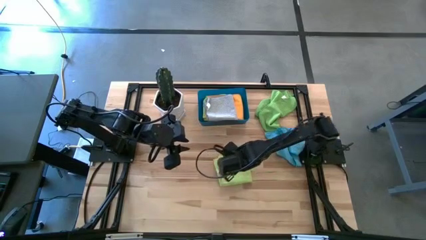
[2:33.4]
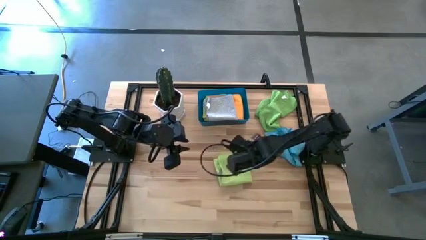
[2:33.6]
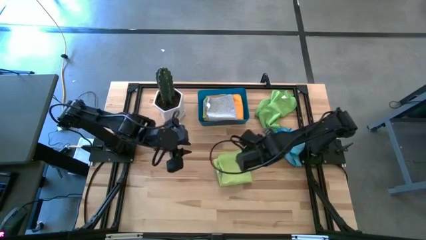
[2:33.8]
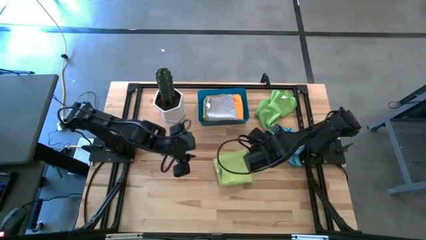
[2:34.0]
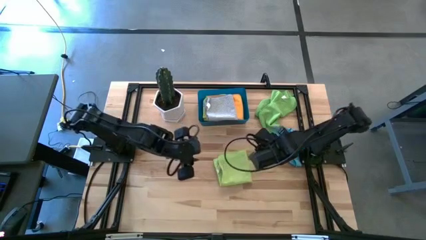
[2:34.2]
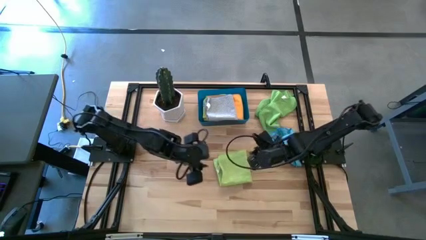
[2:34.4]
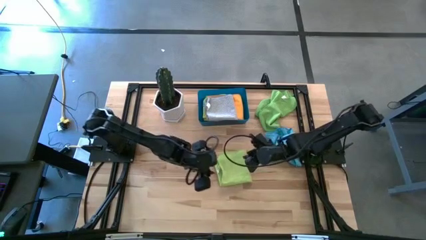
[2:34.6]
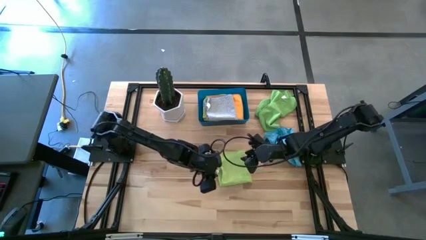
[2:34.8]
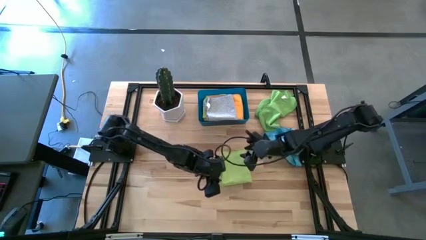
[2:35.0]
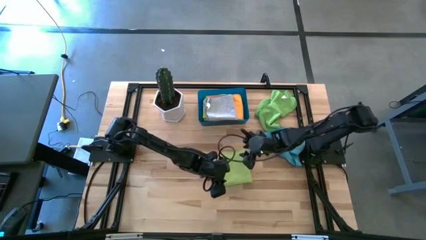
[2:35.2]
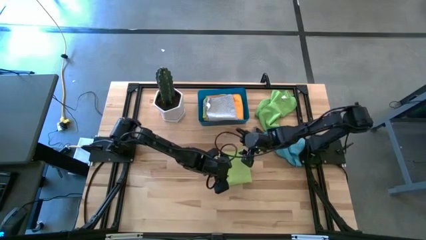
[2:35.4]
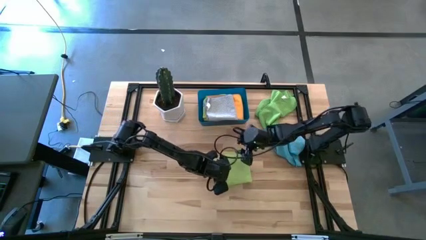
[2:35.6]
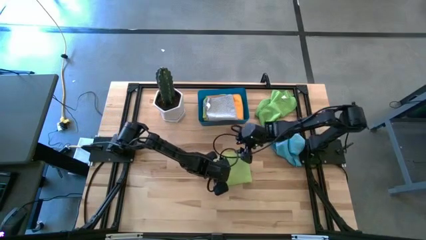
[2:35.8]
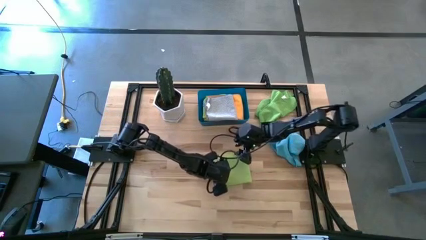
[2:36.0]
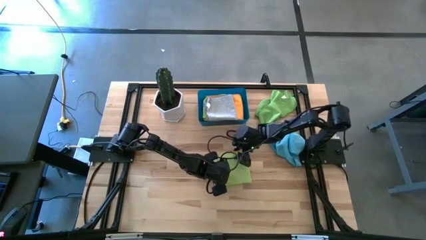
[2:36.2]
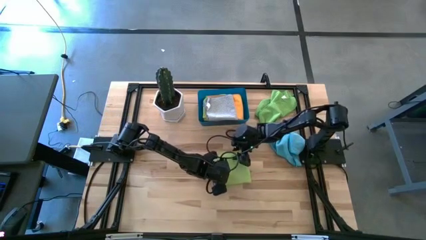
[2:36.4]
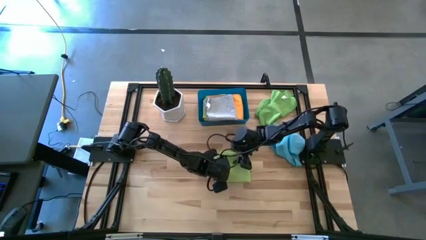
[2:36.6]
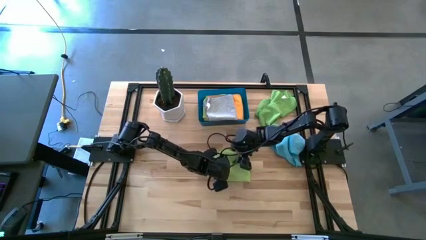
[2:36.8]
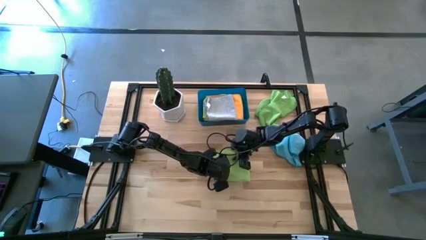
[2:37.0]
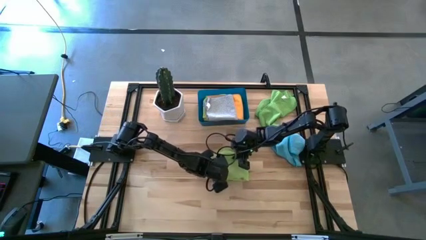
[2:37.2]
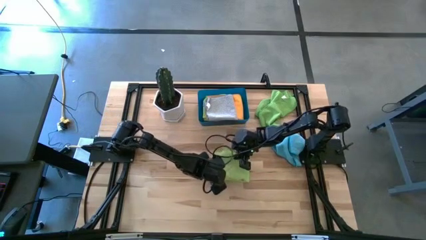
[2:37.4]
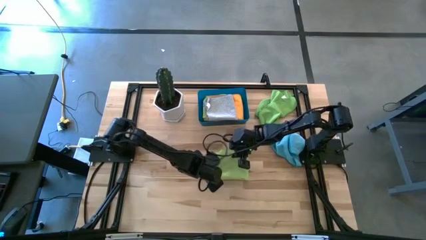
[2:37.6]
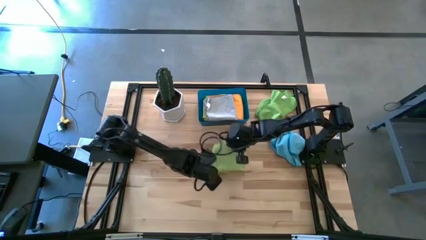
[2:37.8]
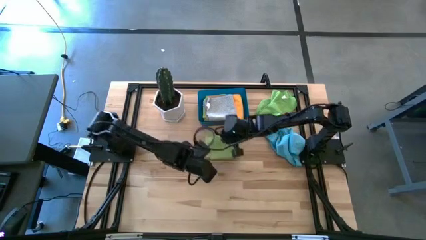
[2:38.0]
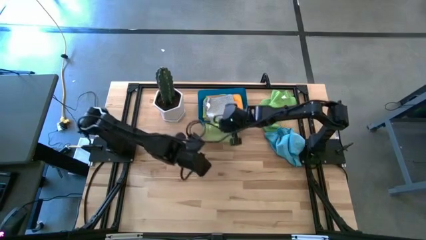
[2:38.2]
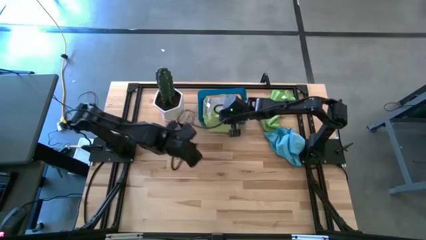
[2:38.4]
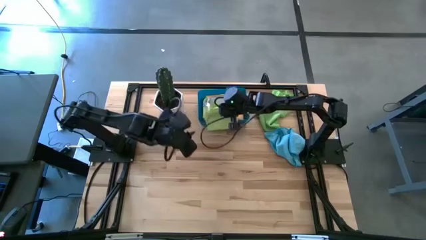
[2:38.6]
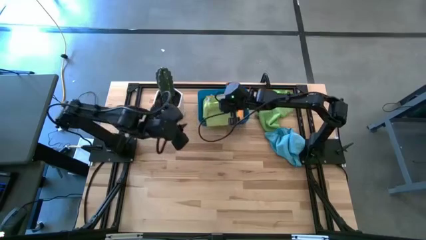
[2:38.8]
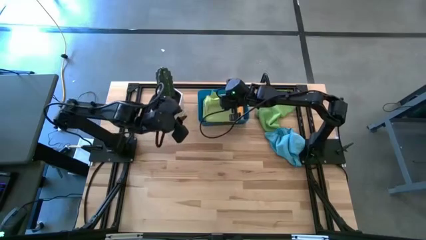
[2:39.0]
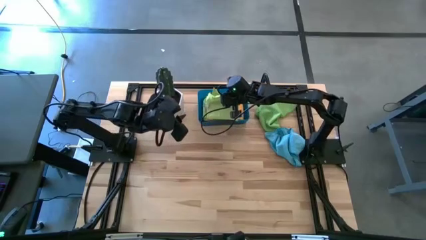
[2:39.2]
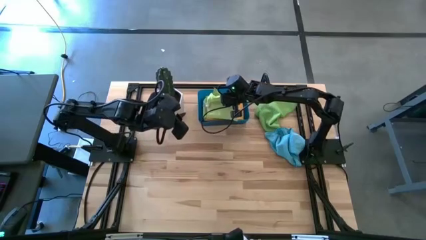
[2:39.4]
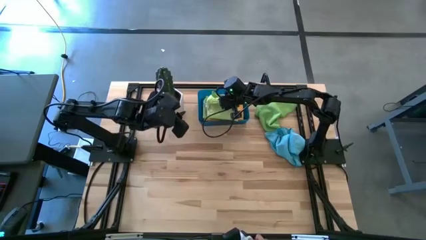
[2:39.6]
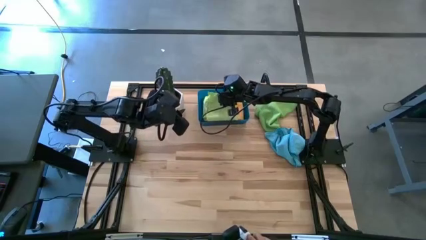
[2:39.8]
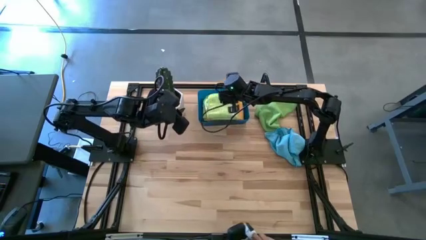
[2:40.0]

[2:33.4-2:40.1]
Task: Fold microfiber towels
Stack the green microfiber towel on top of the gray microfiber towel

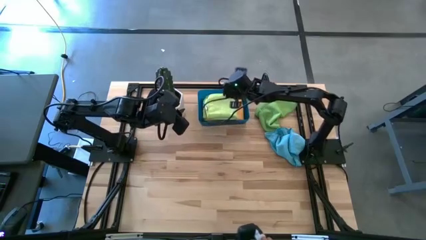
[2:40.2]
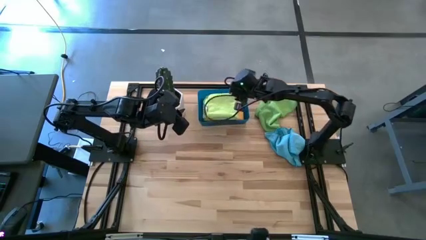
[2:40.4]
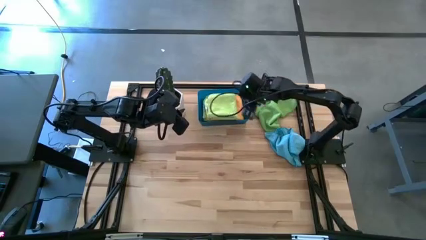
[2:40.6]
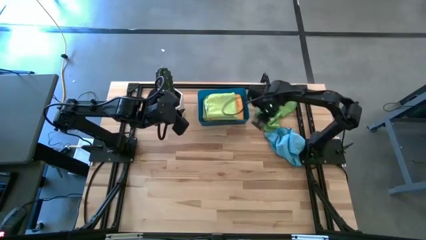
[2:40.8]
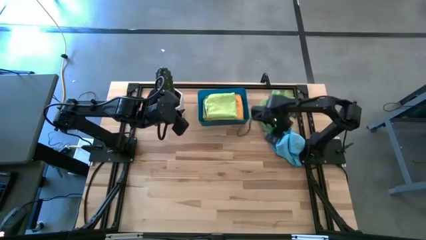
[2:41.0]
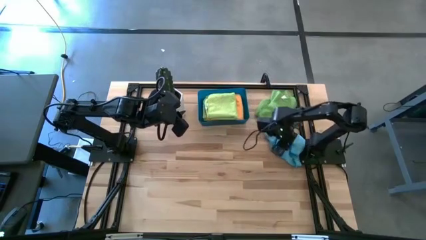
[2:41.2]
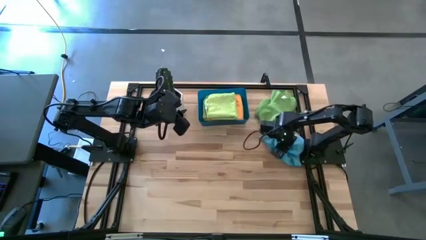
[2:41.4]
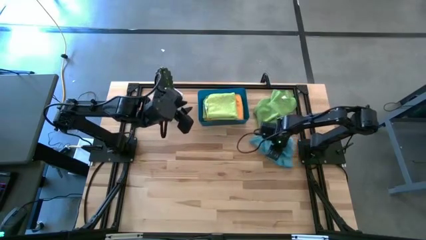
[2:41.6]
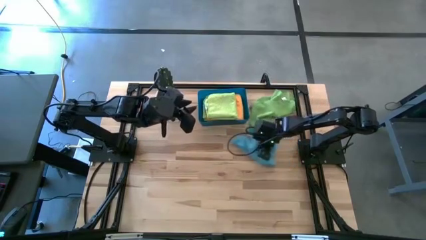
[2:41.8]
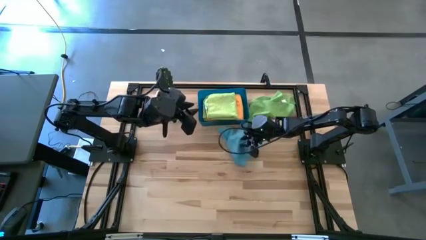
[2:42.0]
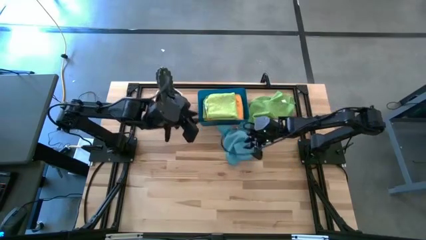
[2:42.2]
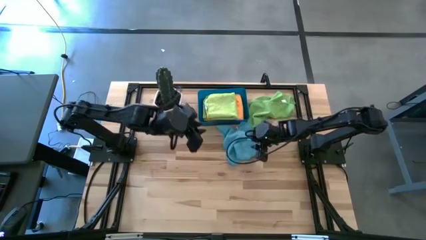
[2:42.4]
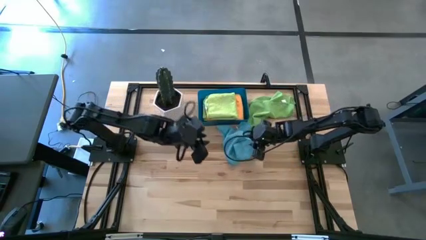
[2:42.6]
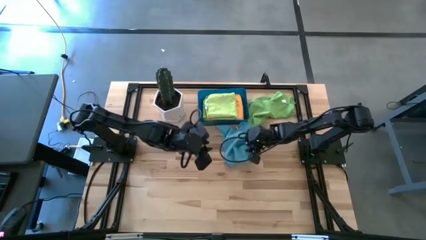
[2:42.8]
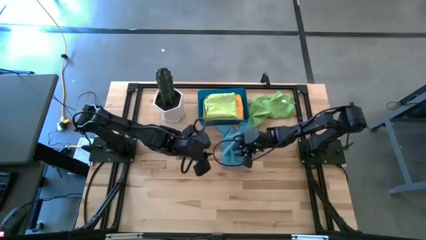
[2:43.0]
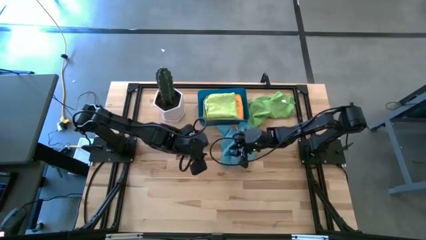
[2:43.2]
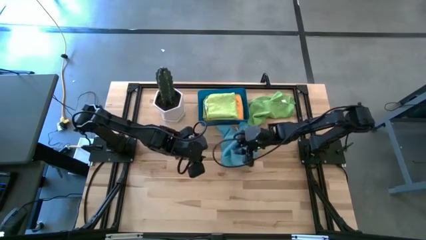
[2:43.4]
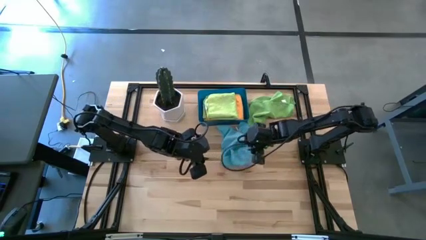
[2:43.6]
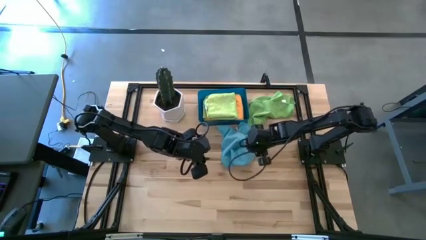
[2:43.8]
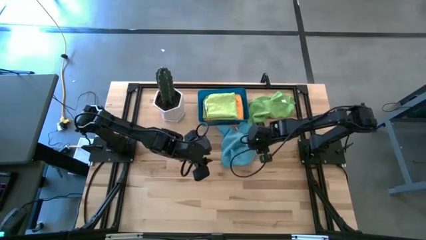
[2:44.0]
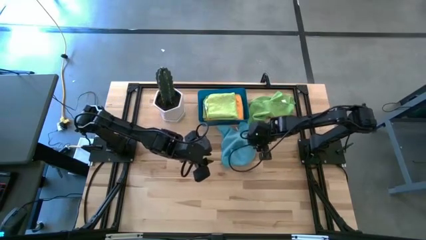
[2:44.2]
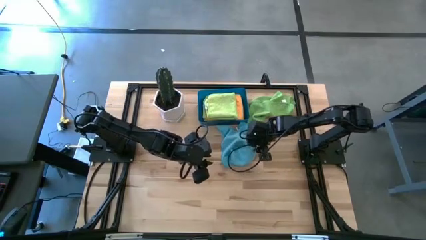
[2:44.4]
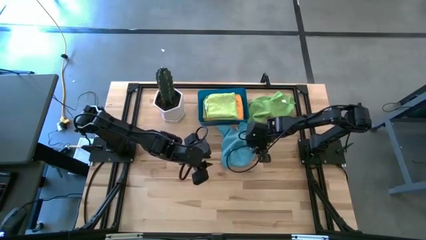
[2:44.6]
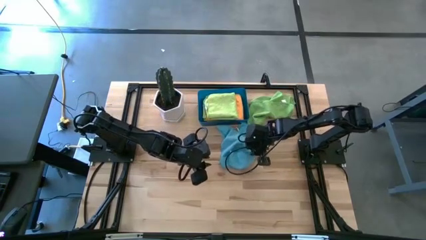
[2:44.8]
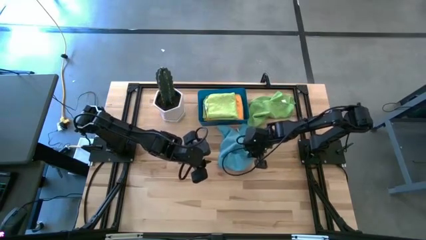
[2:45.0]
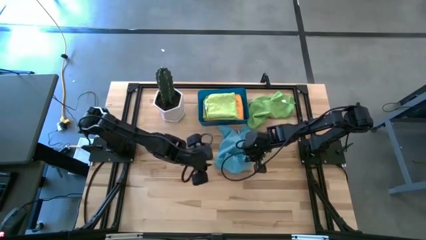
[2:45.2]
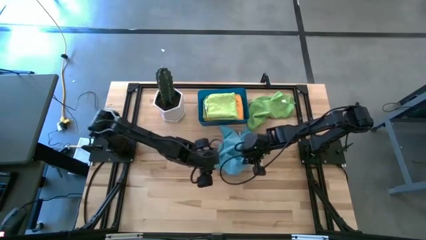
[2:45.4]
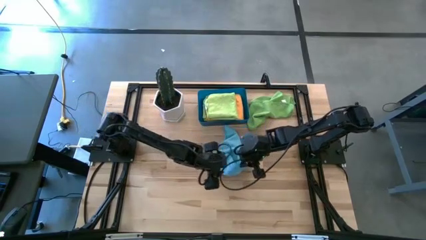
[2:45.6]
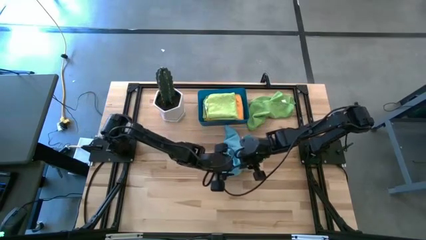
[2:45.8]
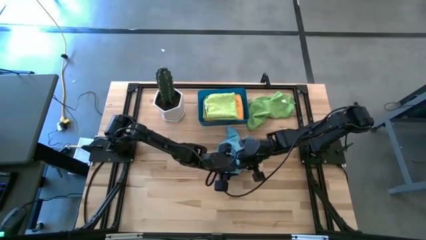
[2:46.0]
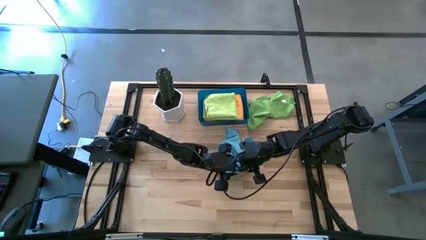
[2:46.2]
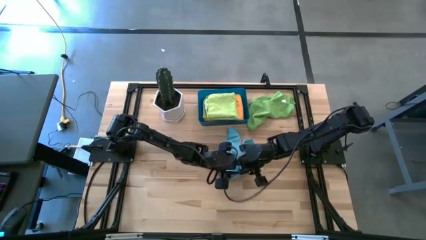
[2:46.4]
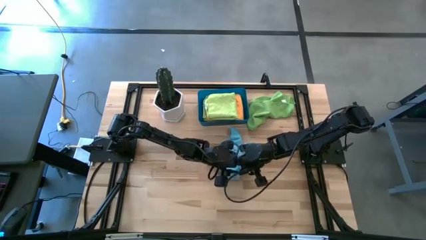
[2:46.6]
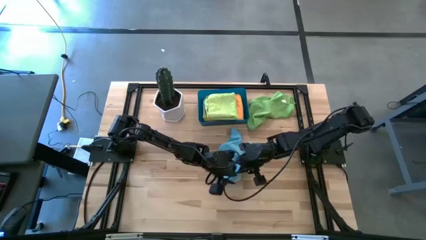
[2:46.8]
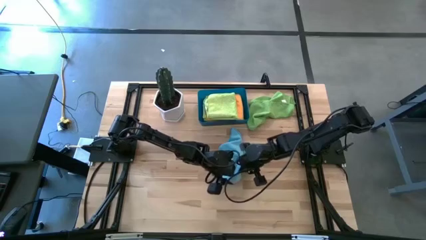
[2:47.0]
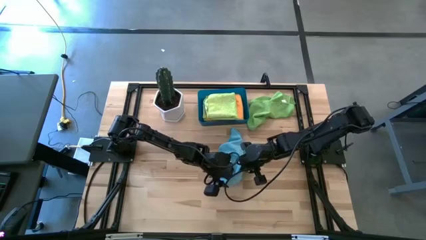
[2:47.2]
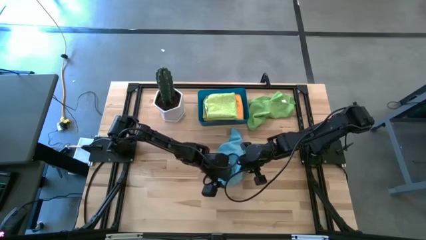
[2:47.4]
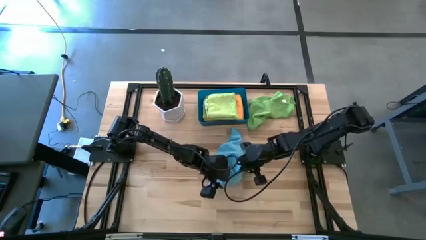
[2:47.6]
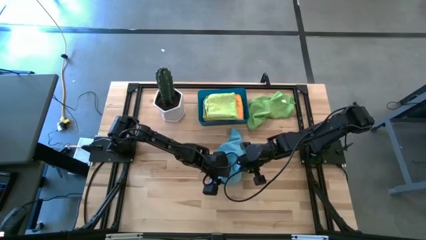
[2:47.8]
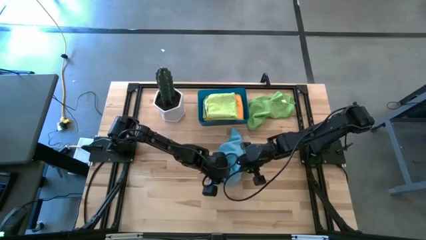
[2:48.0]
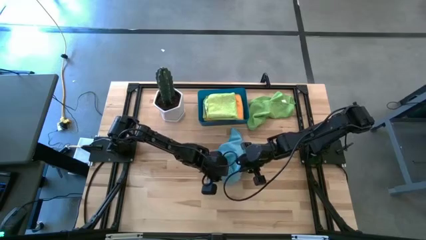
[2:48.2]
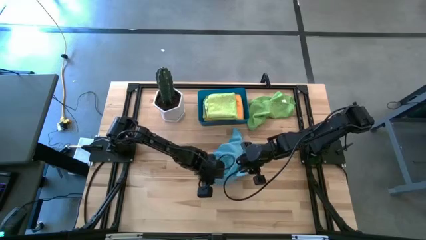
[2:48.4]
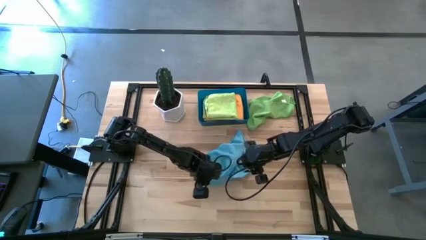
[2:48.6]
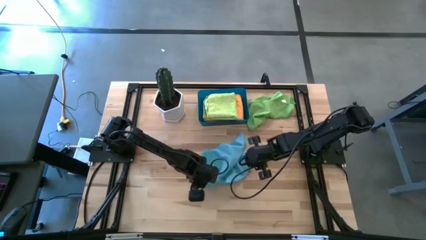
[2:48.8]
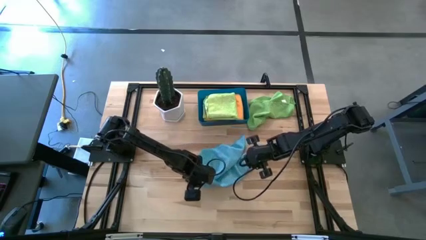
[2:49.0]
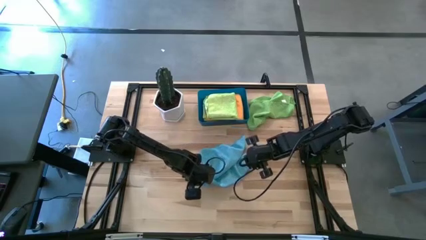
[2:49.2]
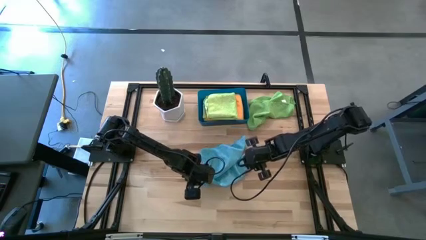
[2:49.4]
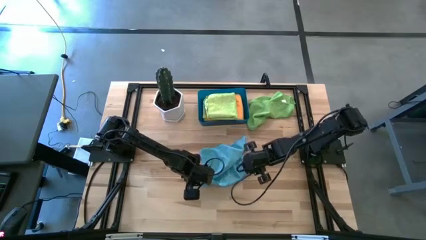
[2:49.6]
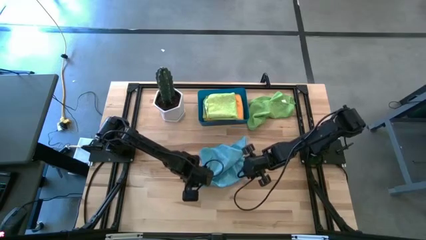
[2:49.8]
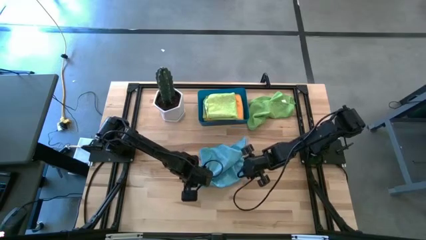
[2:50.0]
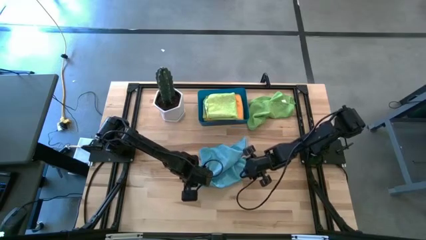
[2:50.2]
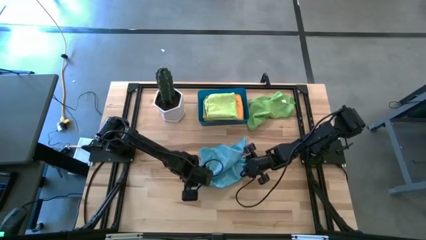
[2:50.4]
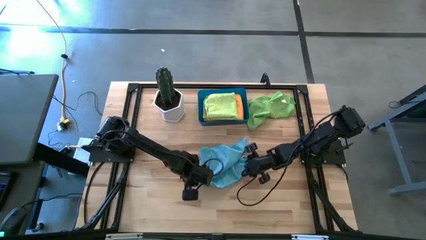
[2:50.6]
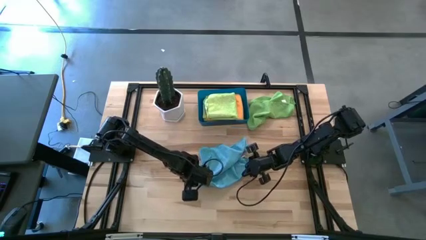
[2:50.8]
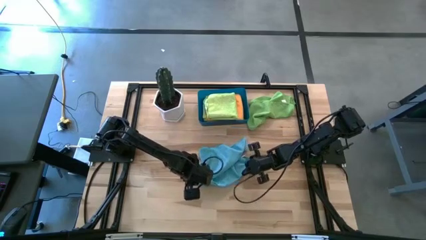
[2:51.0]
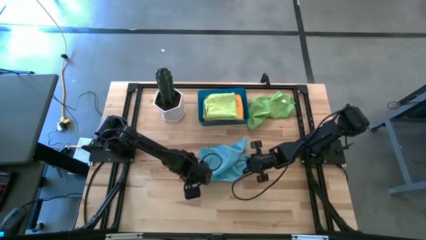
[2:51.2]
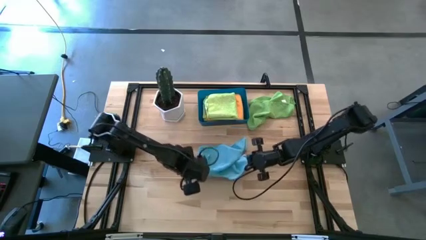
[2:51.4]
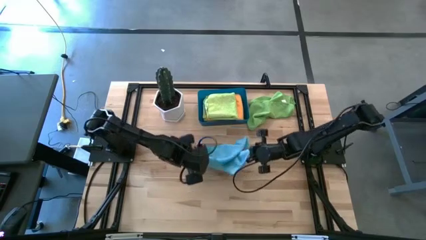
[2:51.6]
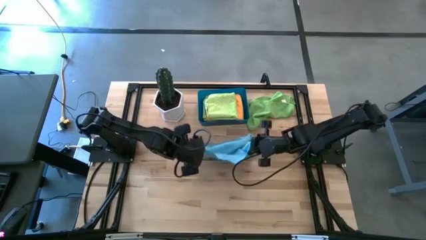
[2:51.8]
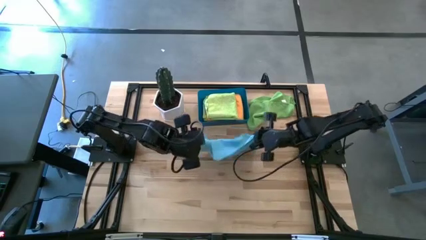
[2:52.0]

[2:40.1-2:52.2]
Fold the blue microfiber towel
